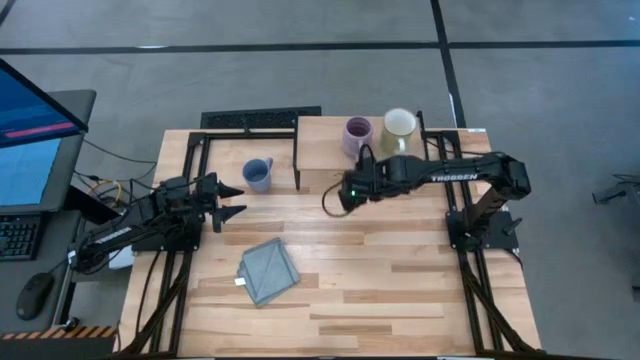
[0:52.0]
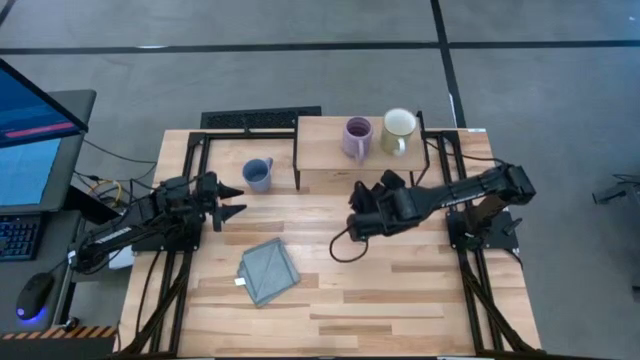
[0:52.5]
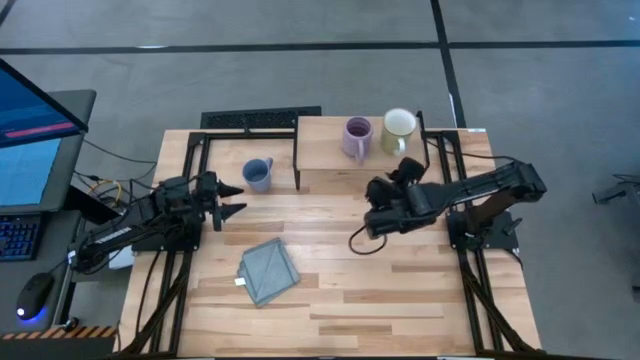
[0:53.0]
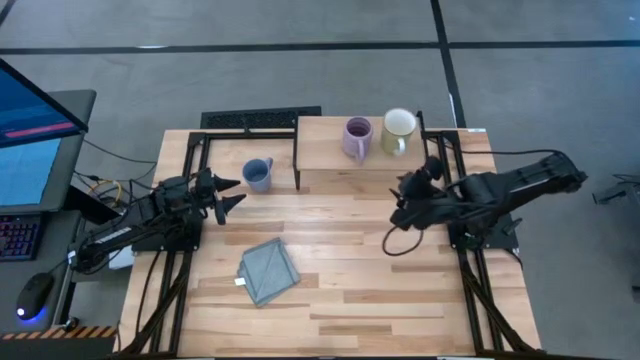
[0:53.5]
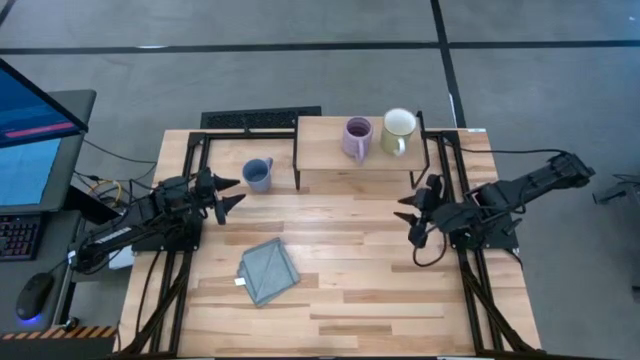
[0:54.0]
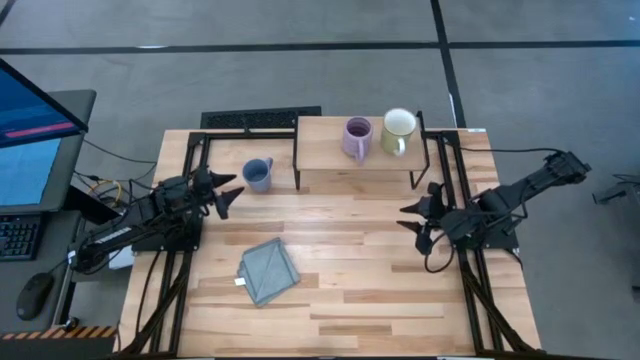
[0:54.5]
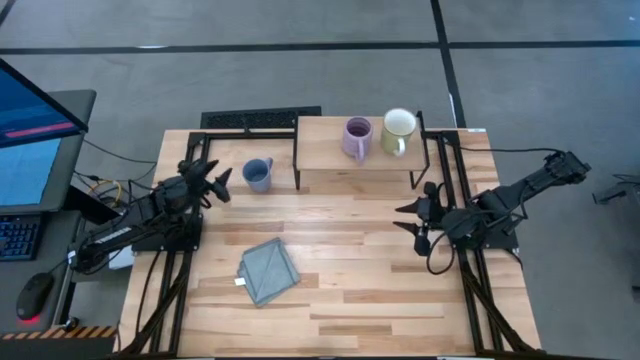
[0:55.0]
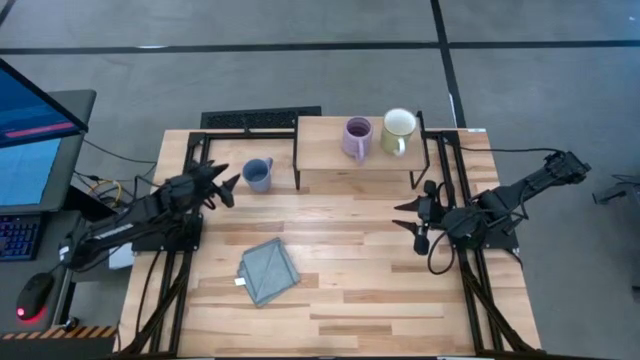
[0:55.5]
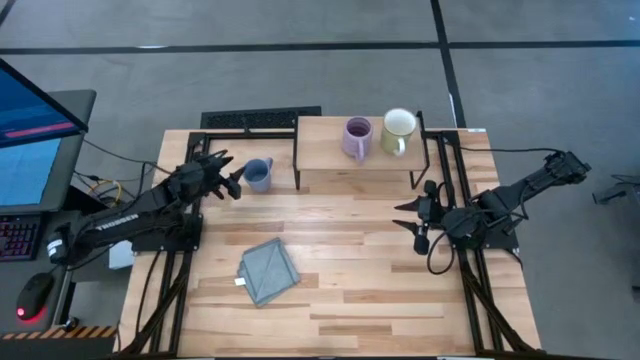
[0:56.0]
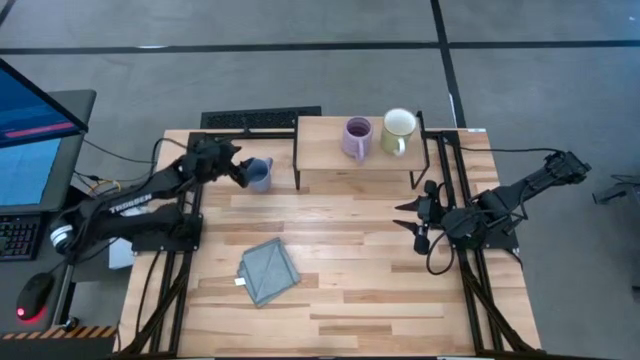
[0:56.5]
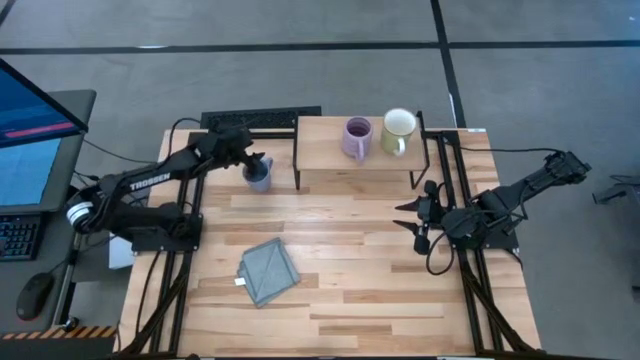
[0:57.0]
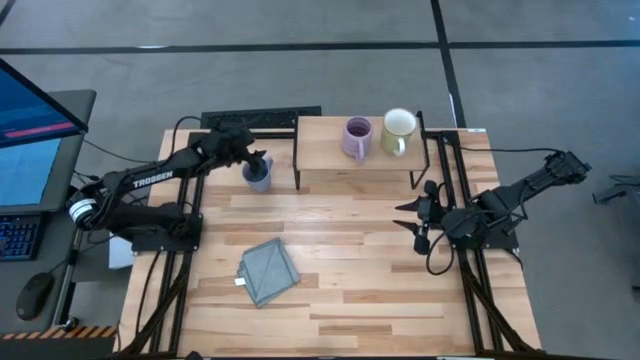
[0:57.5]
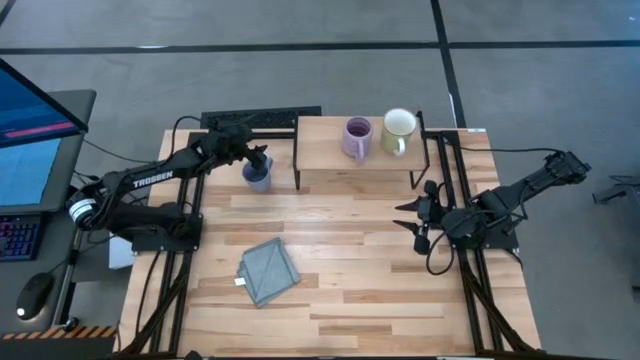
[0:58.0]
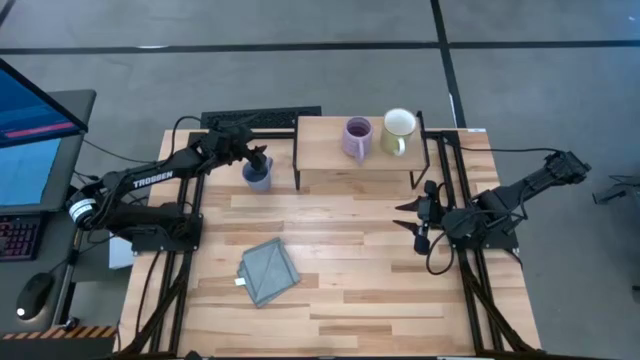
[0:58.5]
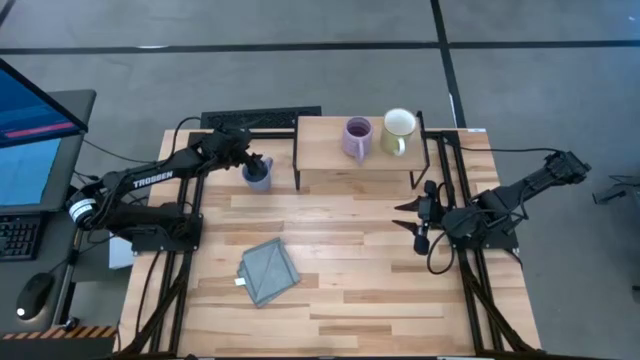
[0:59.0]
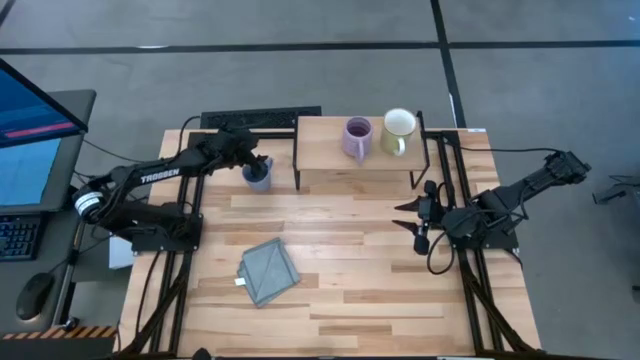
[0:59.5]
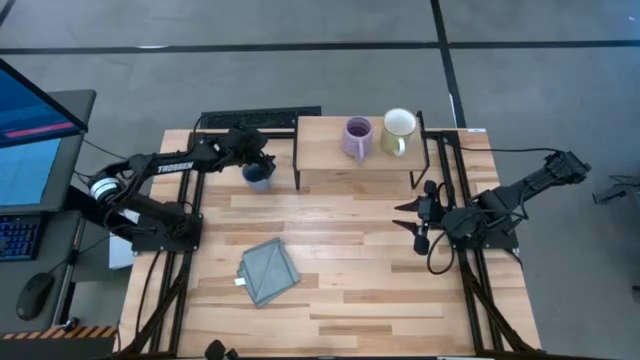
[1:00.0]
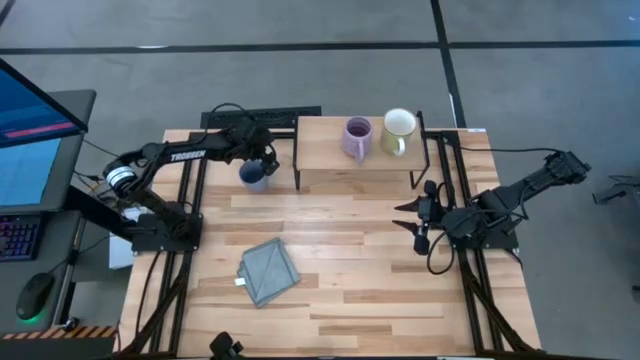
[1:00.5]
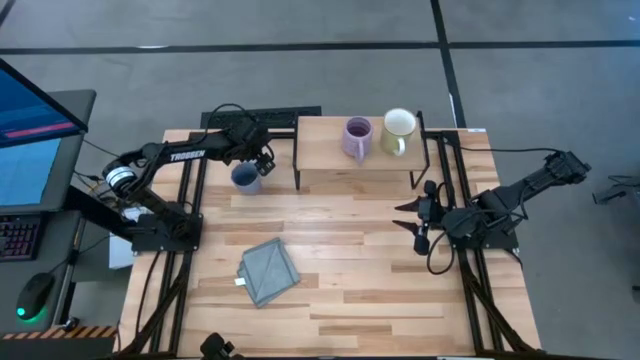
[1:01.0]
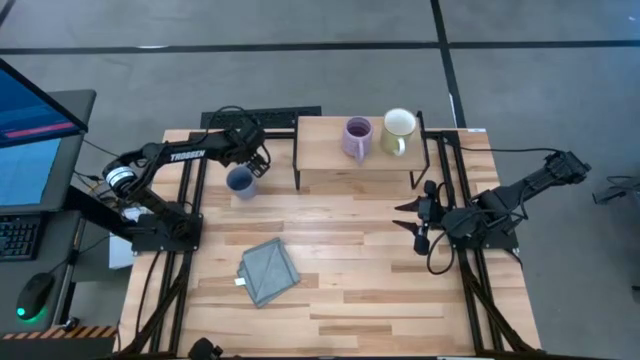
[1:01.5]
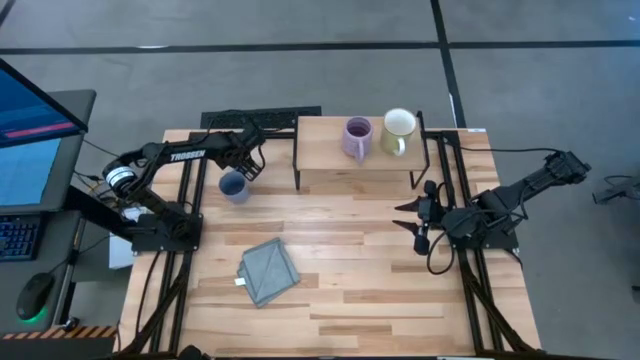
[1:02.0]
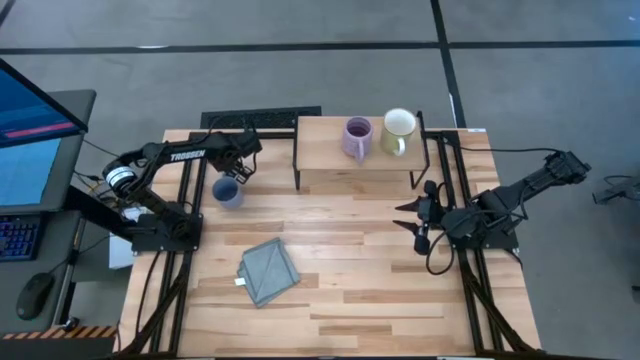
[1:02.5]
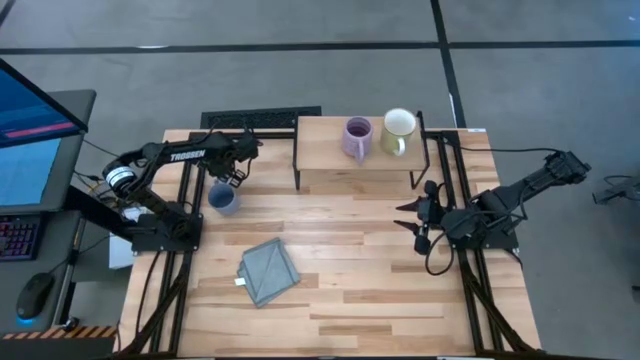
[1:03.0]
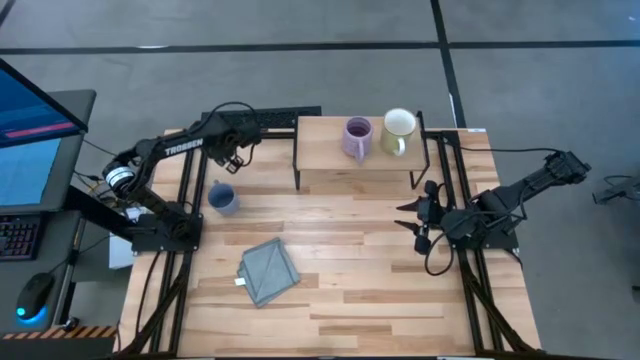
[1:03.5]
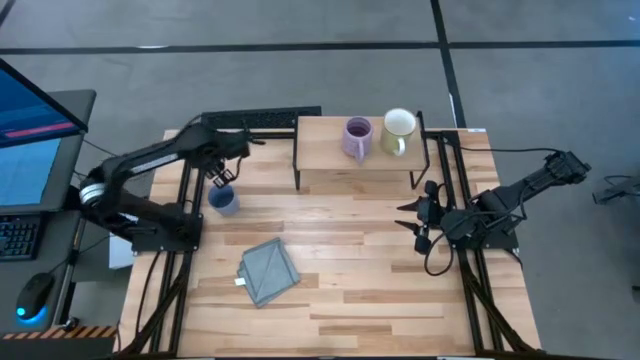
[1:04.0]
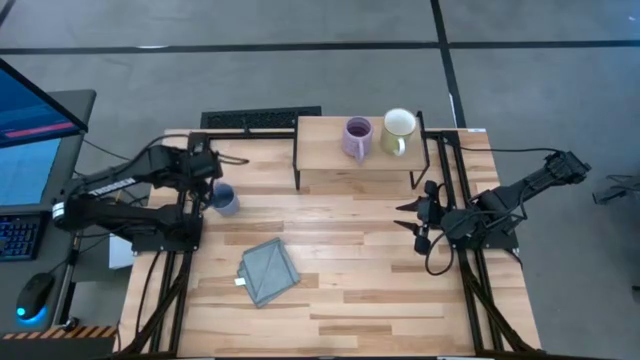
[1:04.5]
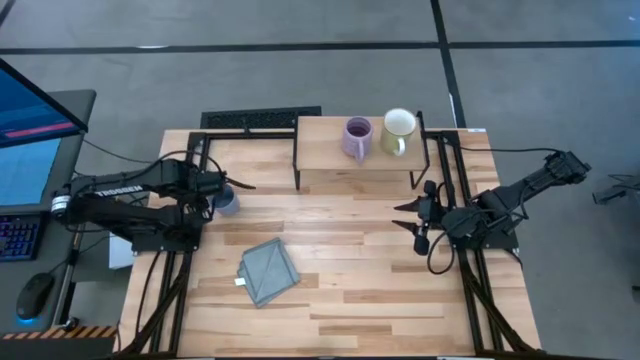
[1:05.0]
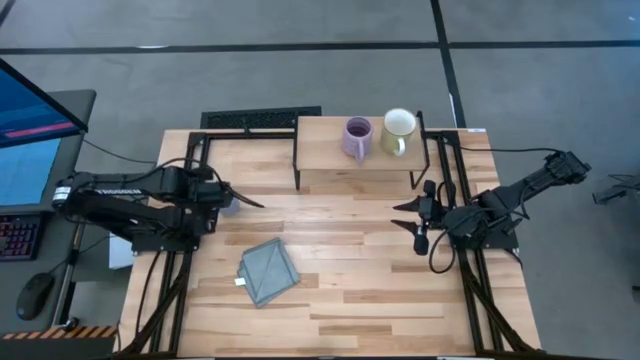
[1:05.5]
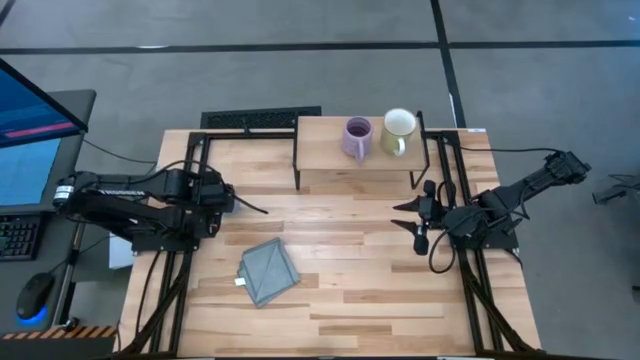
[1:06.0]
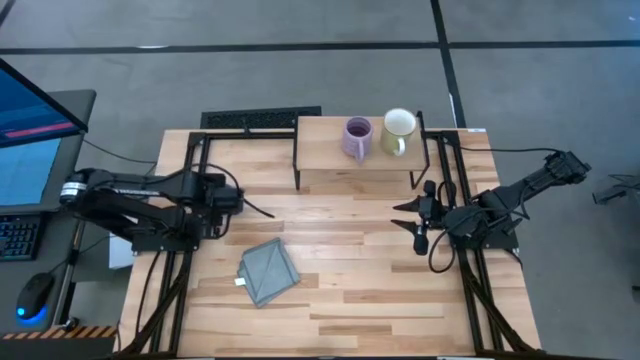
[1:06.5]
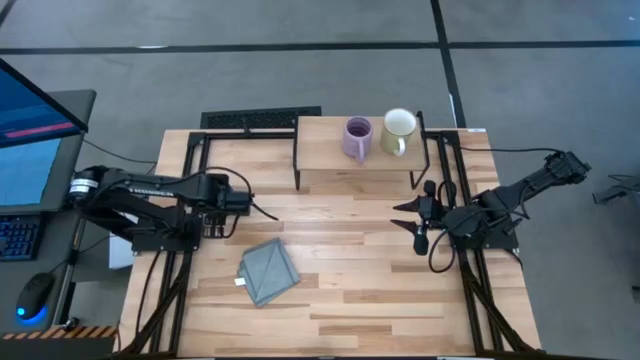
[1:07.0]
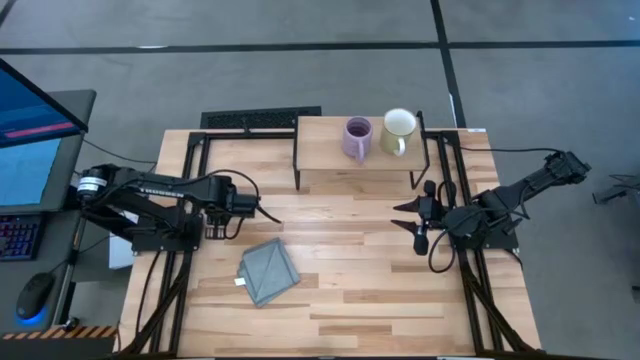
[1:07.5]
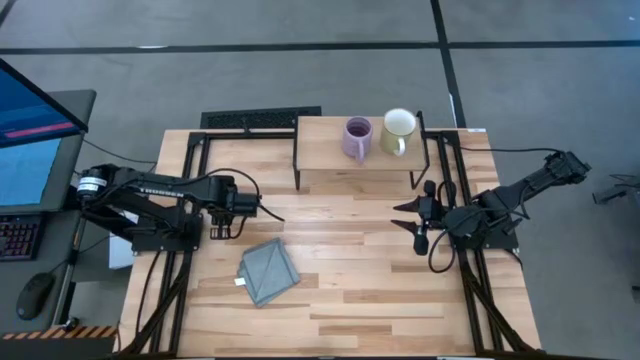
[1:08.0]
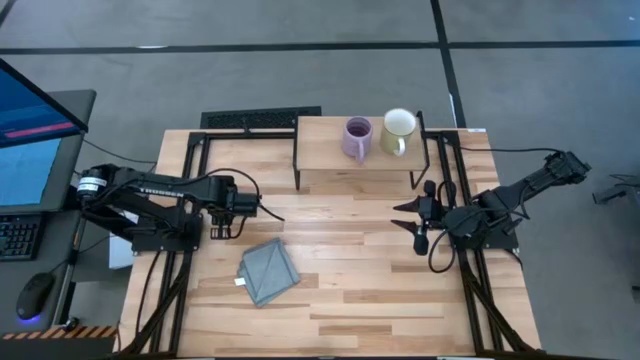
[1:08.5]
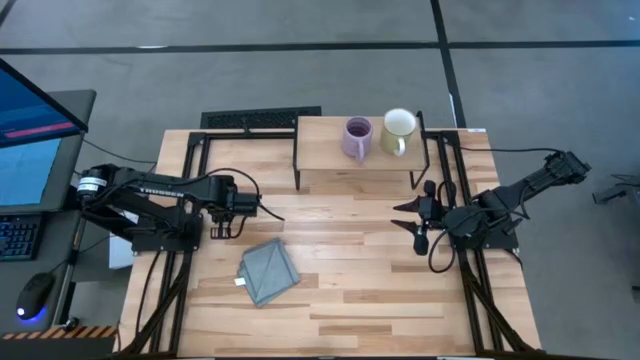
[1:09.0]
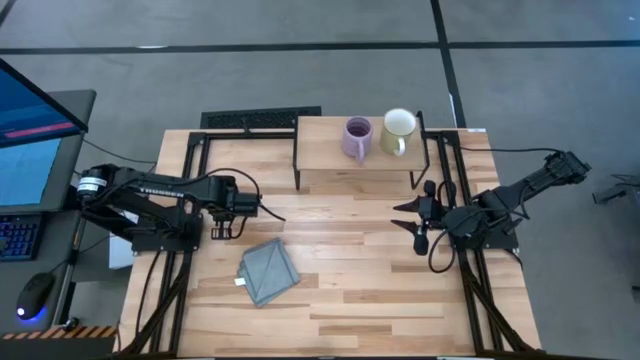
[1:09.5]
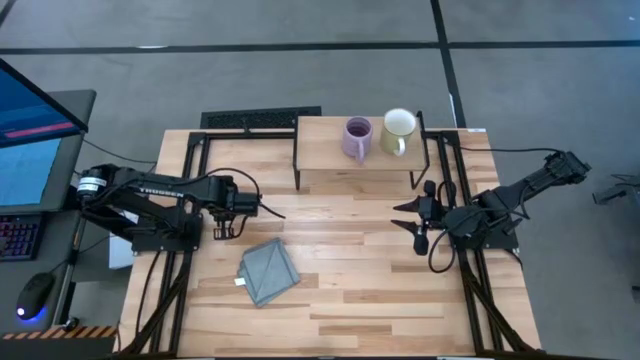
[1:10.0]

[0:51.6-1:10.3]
Task: Stack small to large cups/mugs on shelf
Put the blue mug on the shelf
